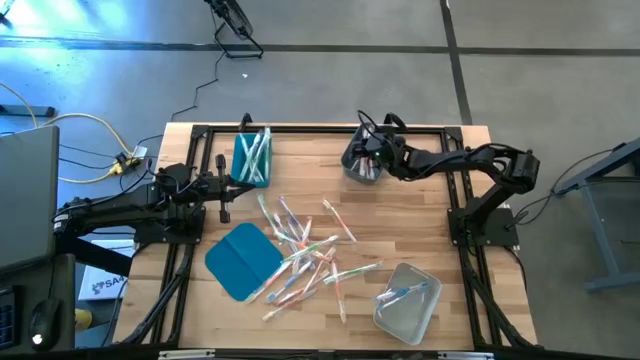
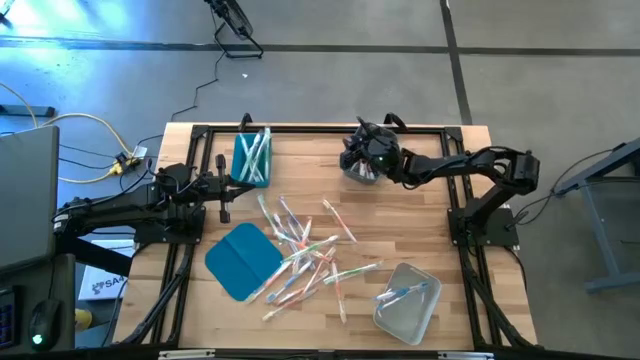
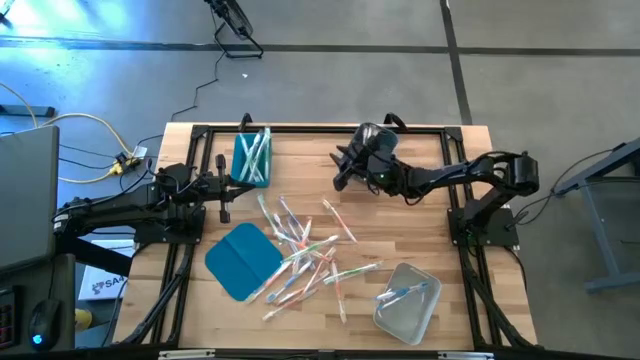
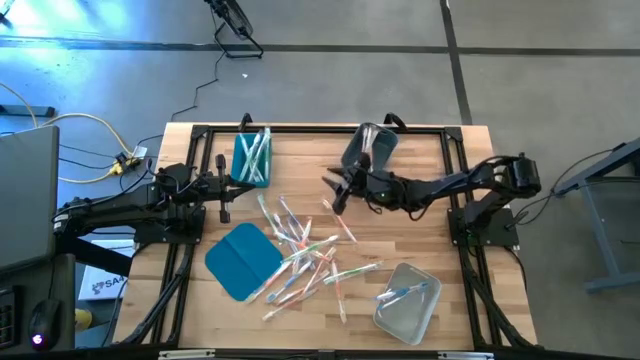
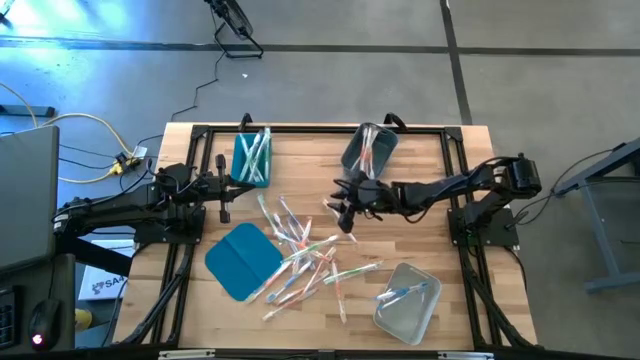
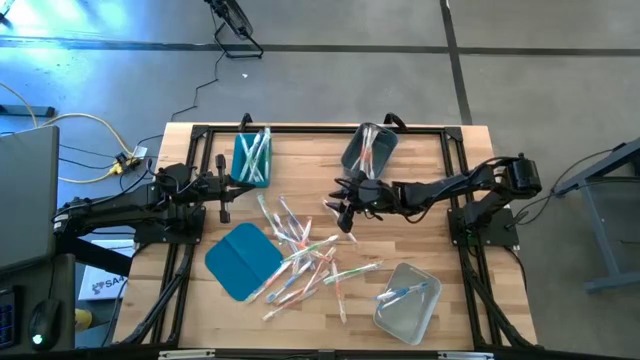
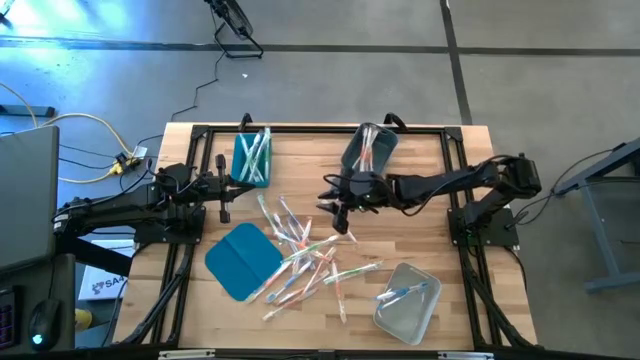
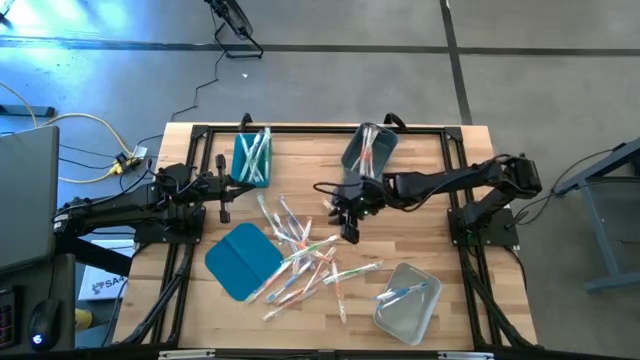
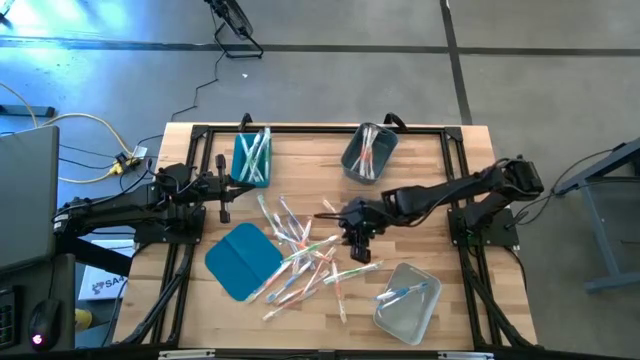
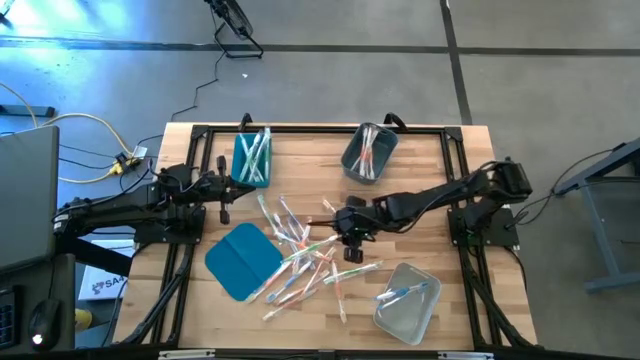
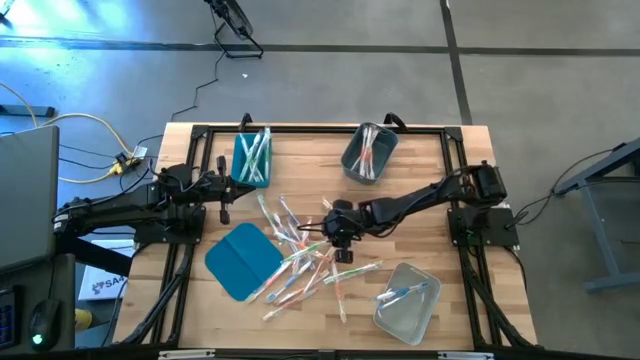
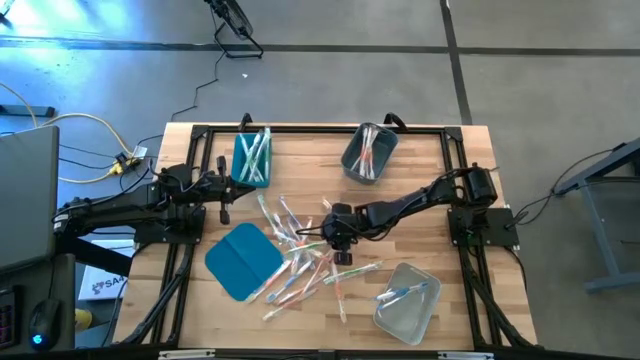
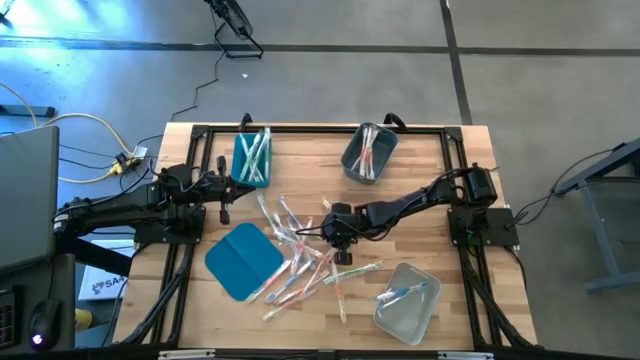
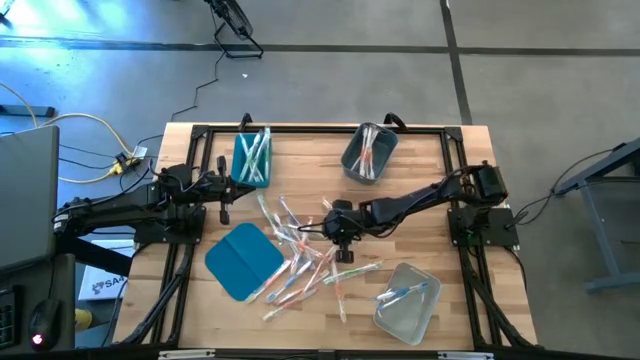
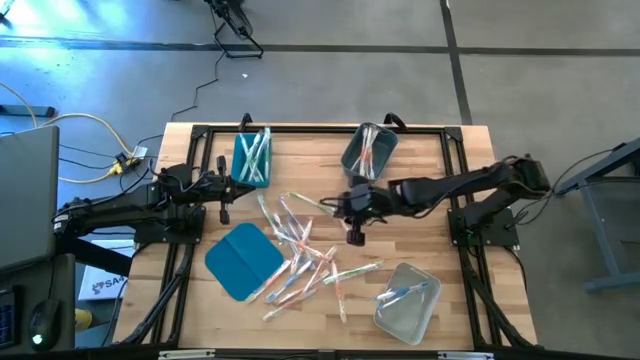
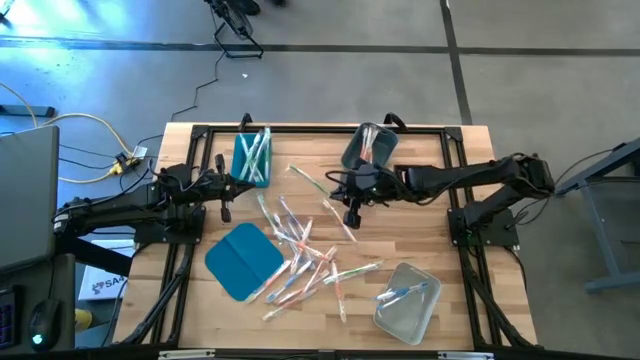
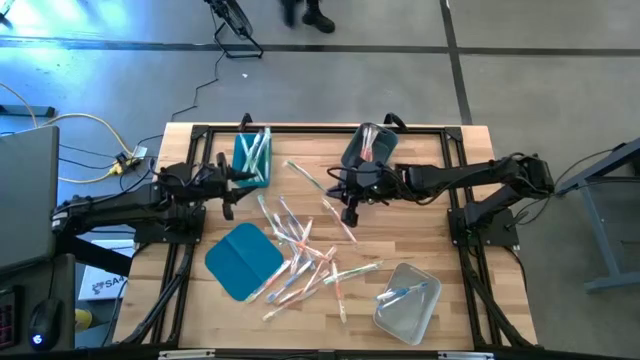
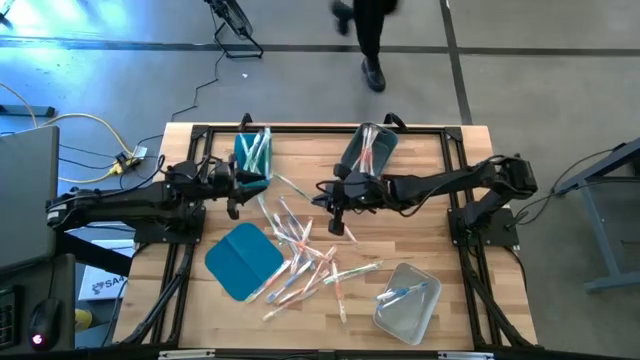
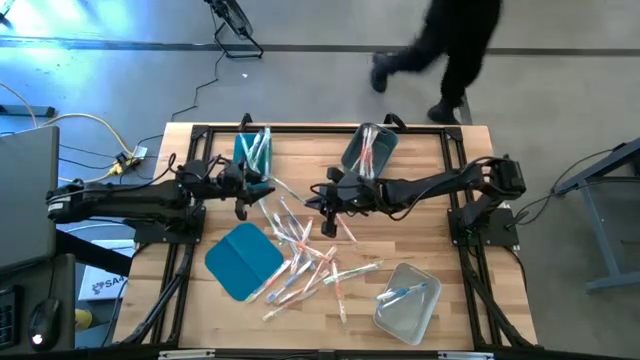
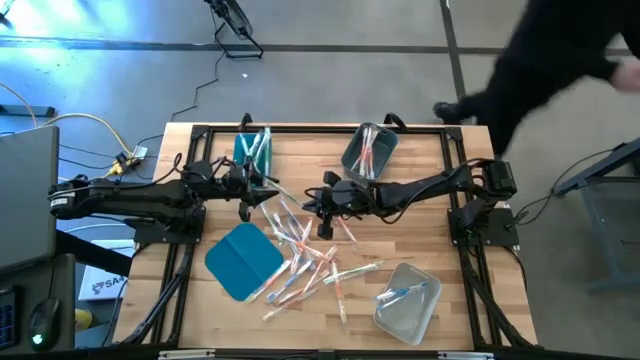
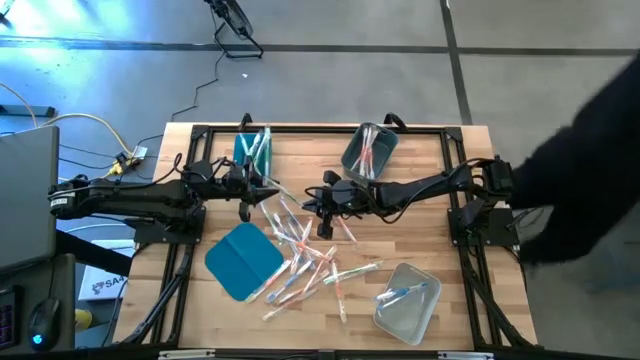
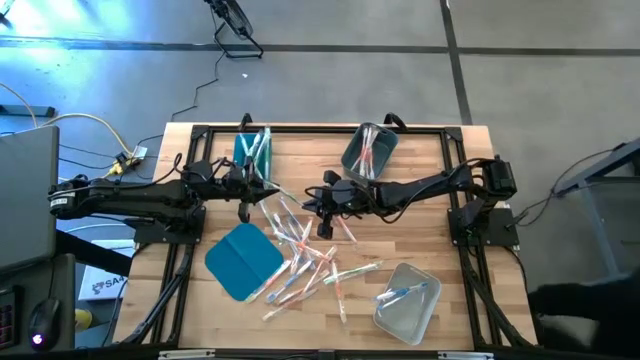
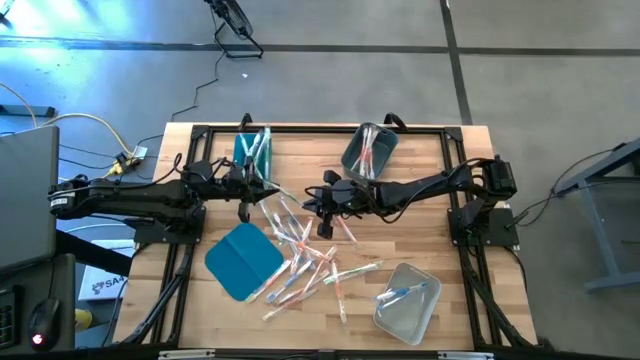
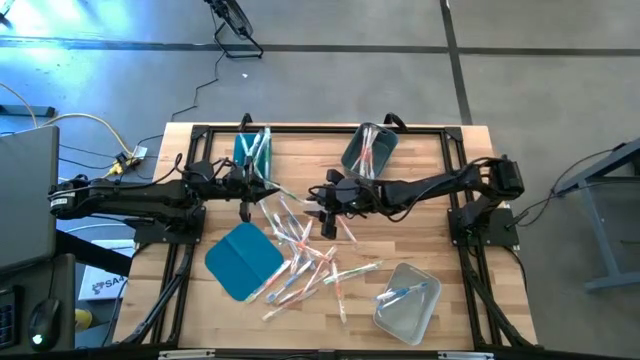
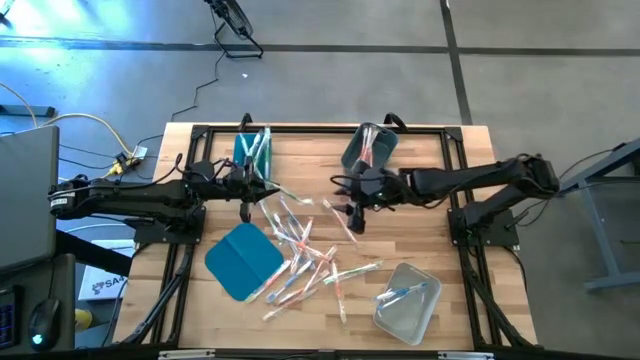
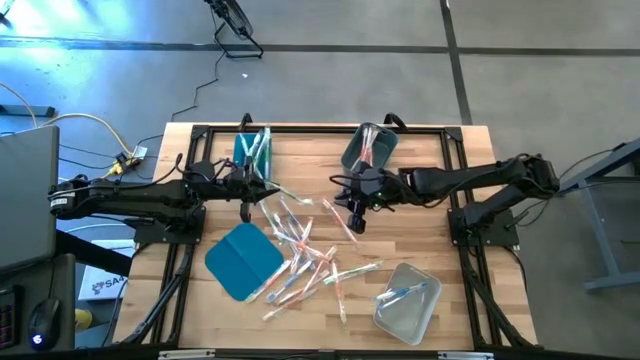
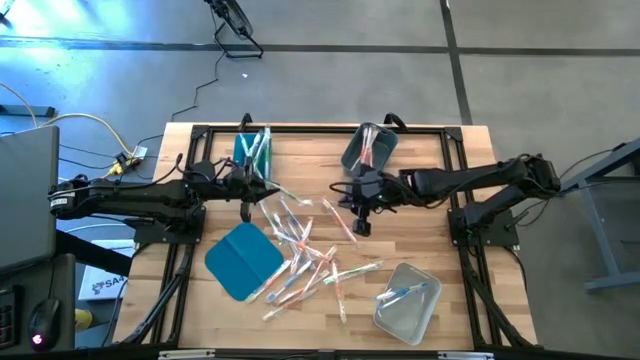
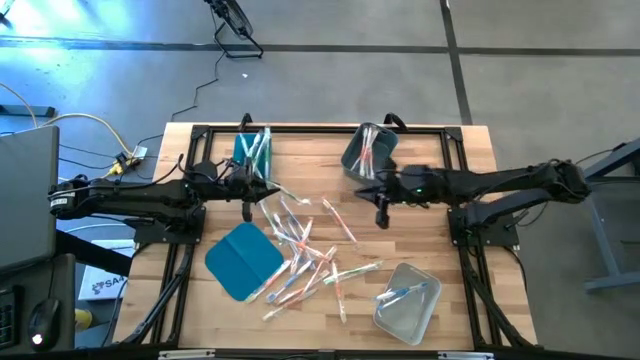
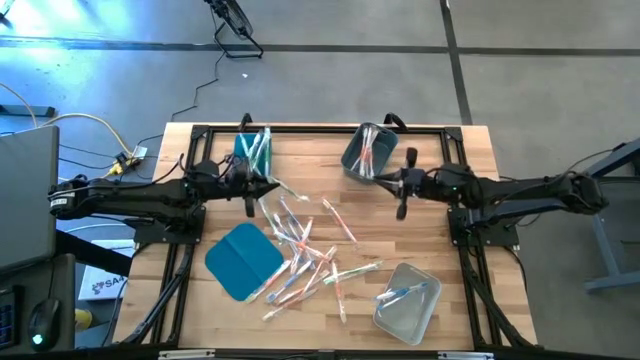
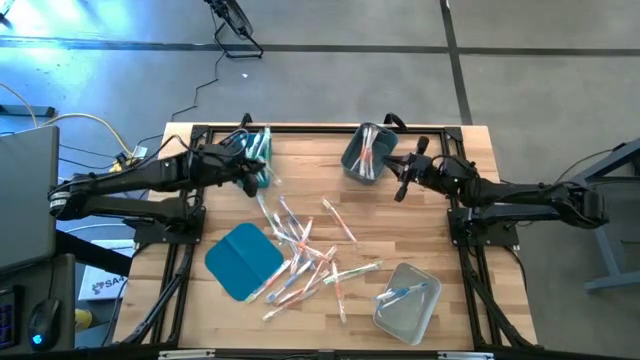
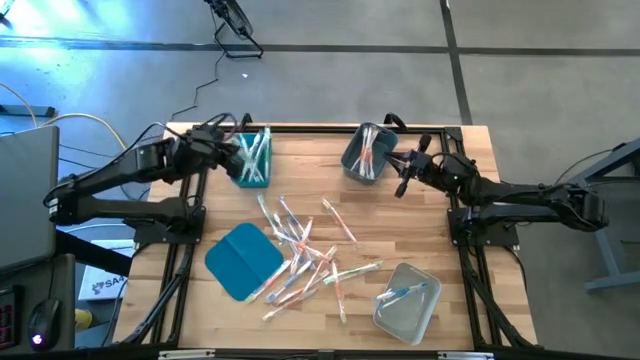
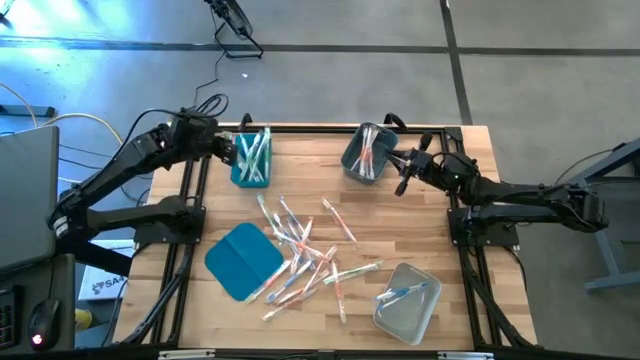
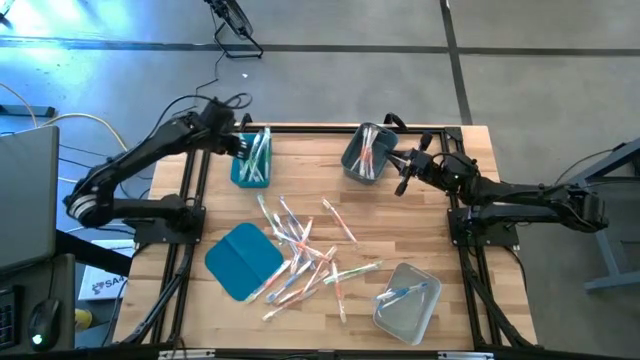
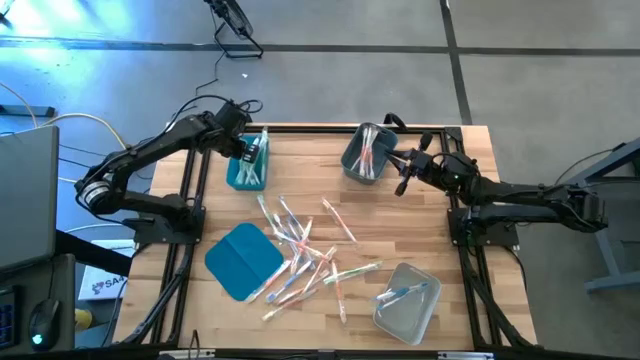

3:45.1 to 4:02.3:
Task: Pick & Place Toothbrushes
Put the middle green toothbrush into the blue bin

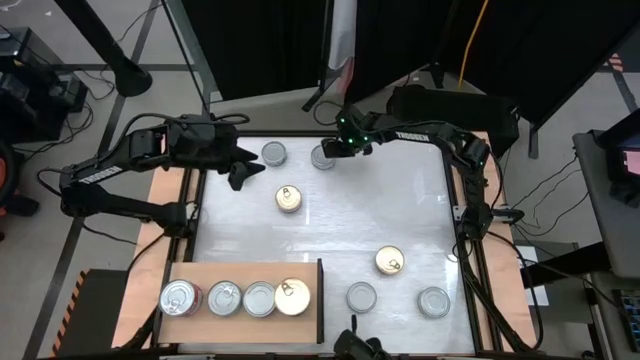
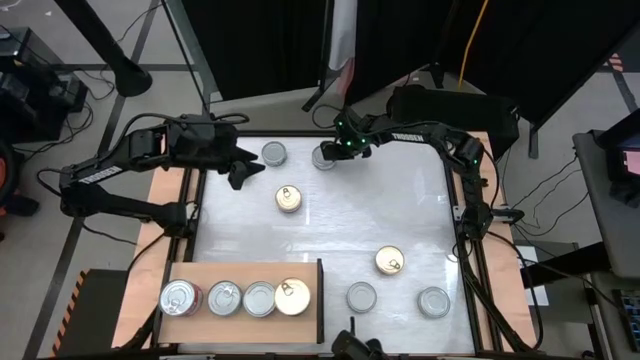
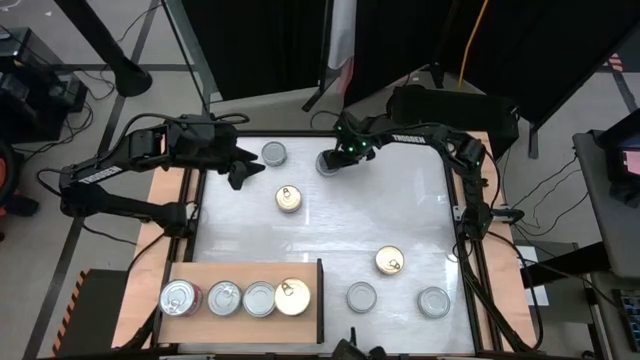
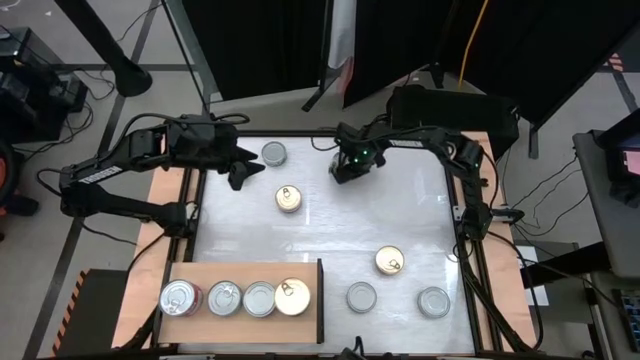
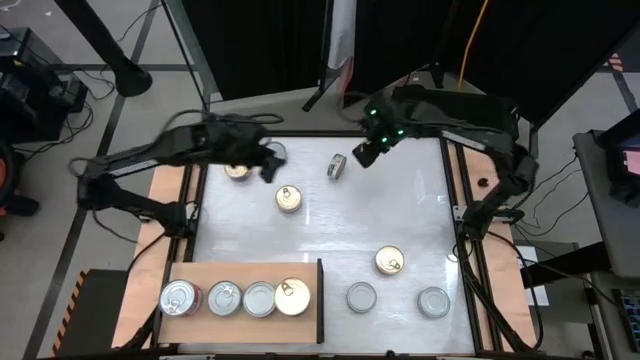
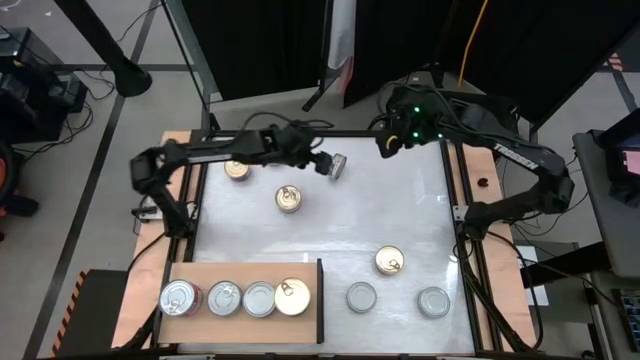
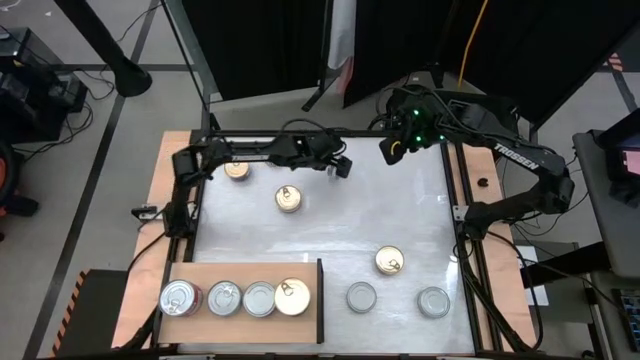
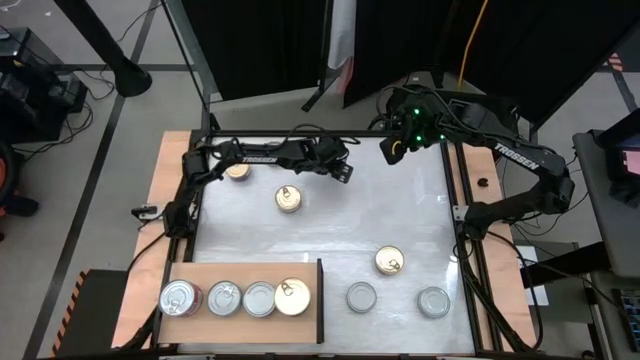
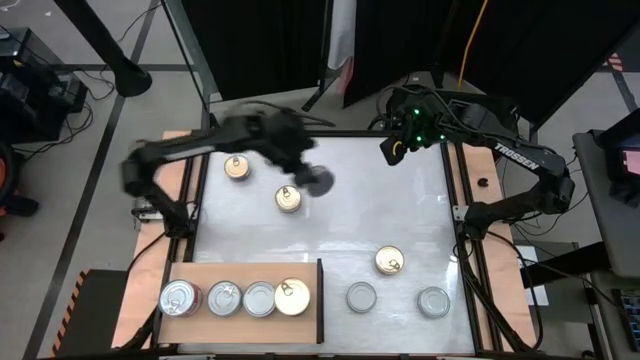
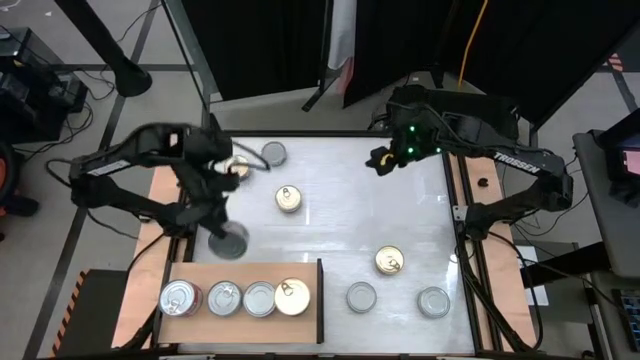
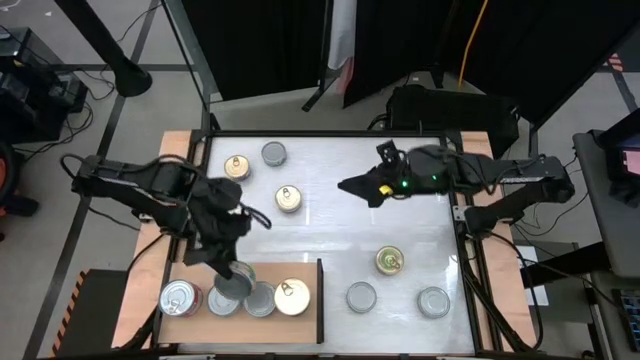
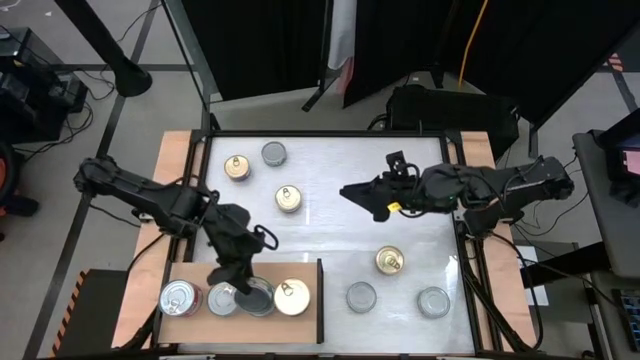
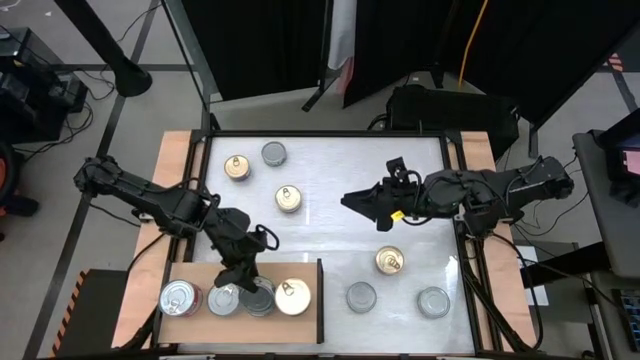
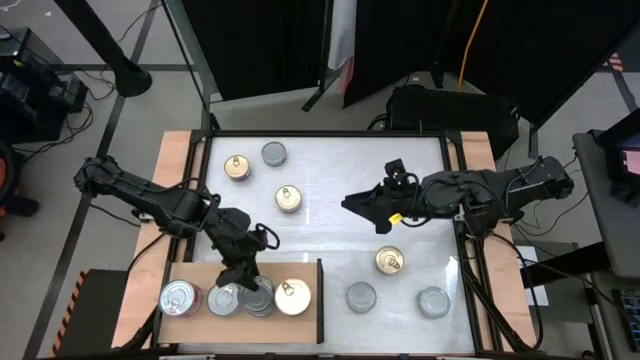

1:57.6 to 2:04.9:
Task: Stack canned seafood by type on shelf
Stack the green white tuna can on top of other green white tuna can on the shelf
